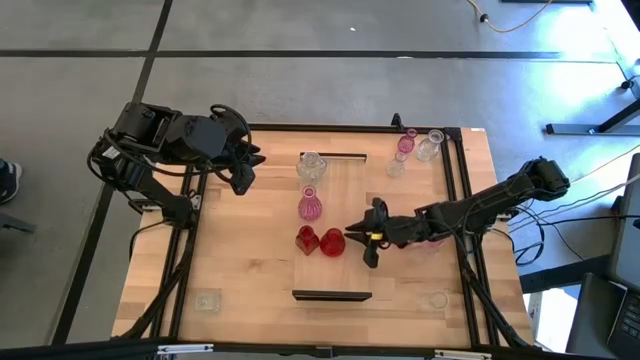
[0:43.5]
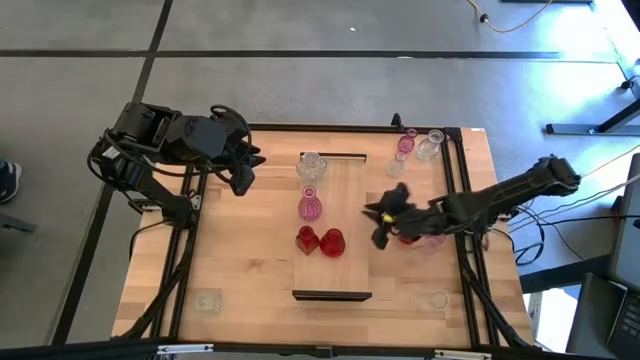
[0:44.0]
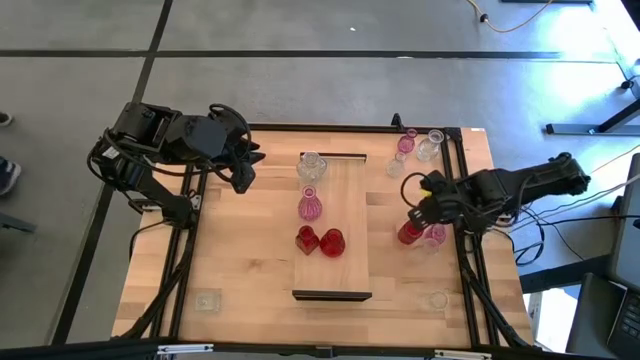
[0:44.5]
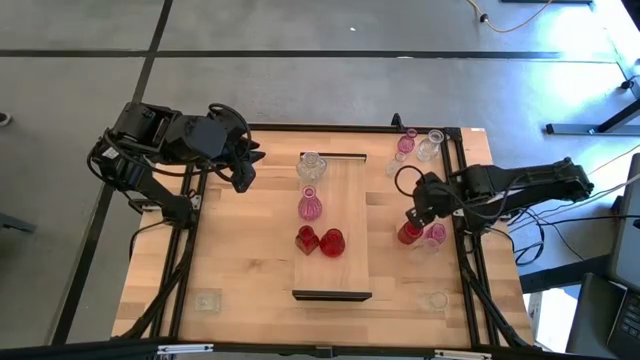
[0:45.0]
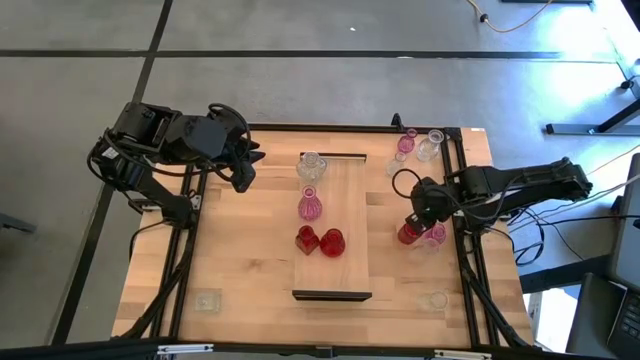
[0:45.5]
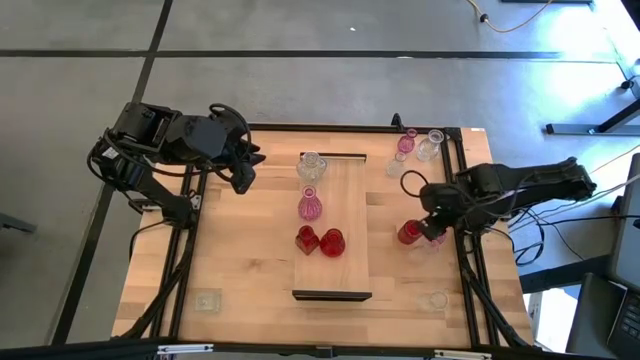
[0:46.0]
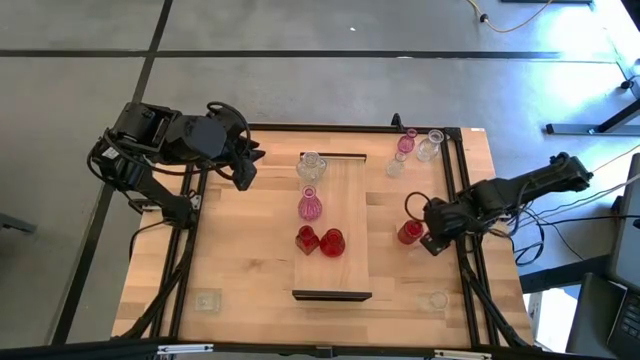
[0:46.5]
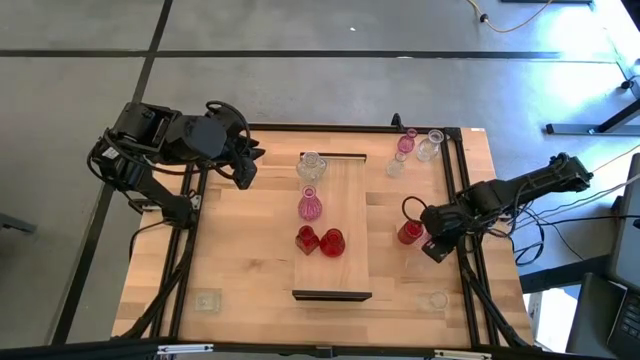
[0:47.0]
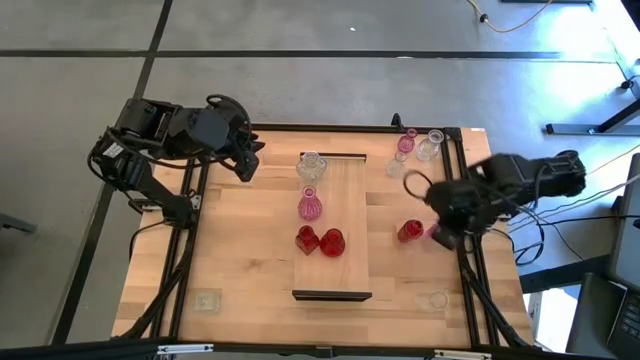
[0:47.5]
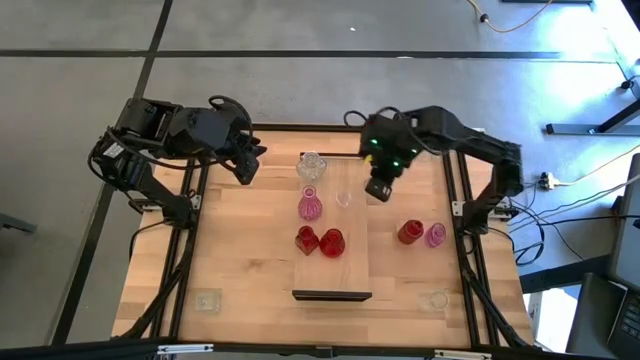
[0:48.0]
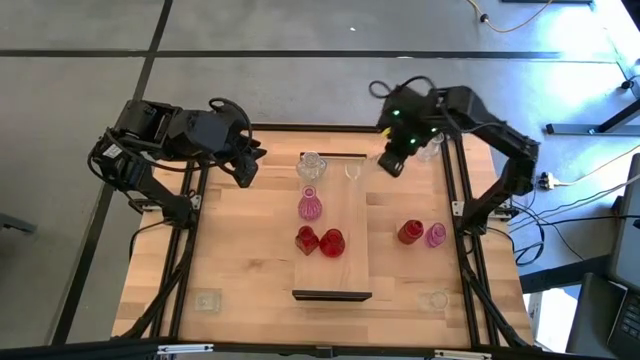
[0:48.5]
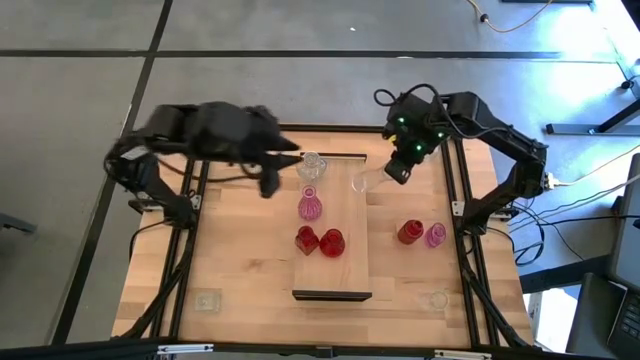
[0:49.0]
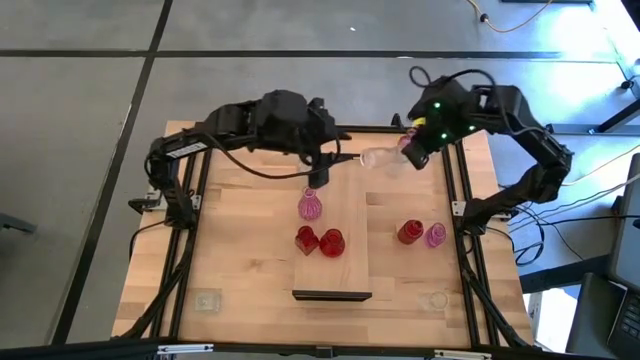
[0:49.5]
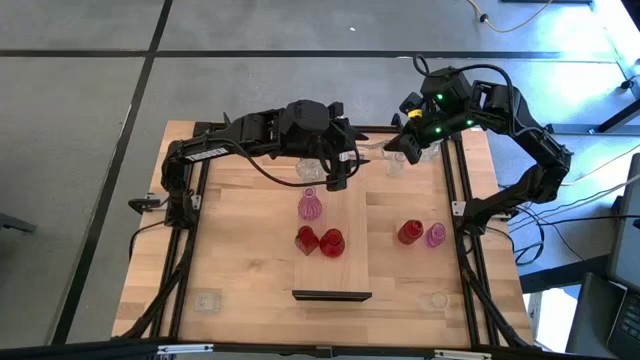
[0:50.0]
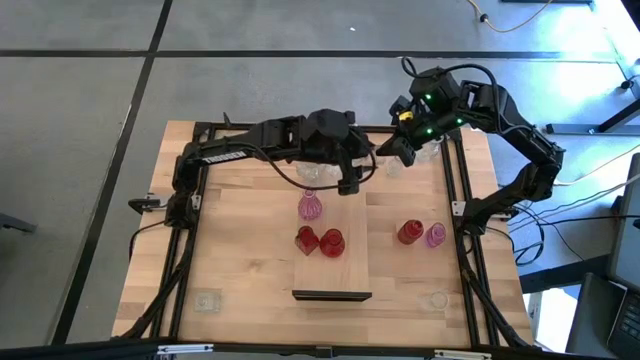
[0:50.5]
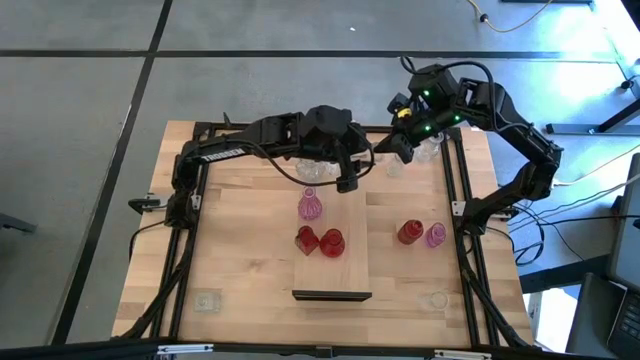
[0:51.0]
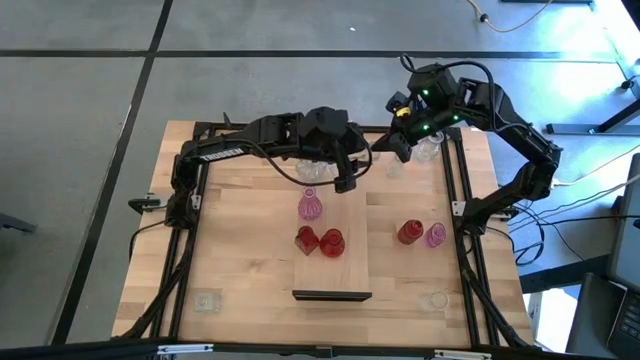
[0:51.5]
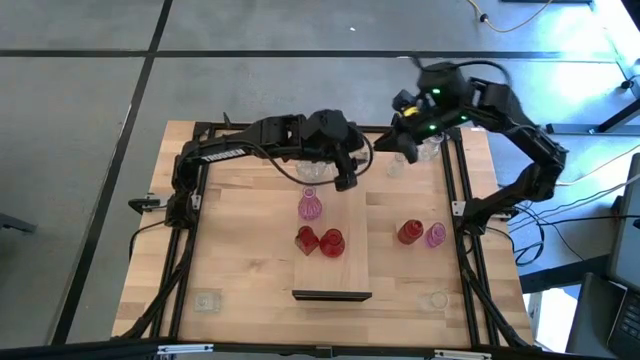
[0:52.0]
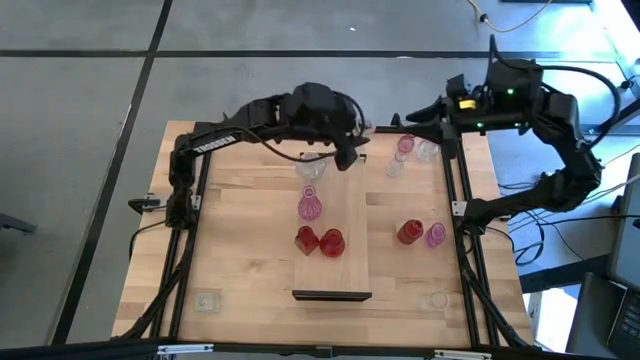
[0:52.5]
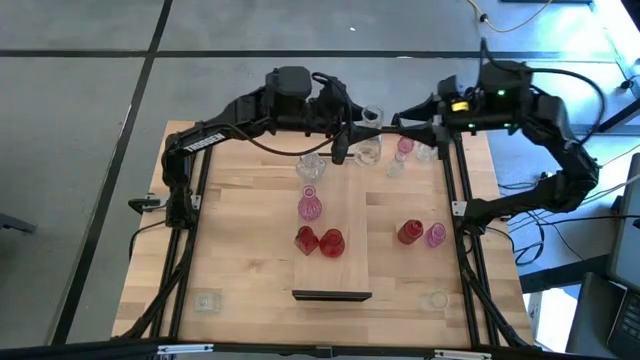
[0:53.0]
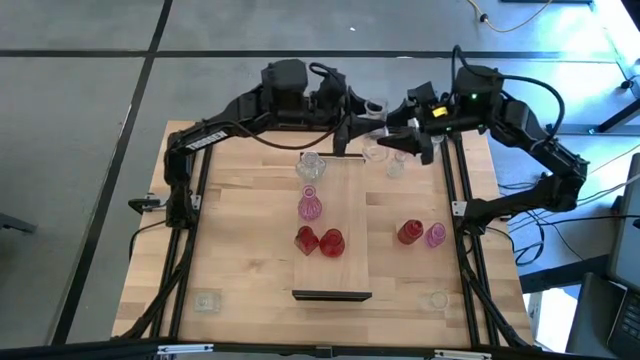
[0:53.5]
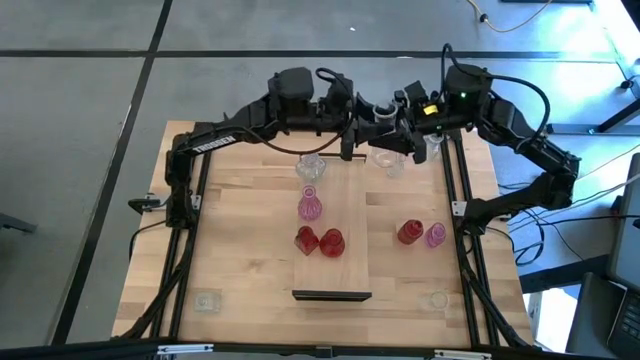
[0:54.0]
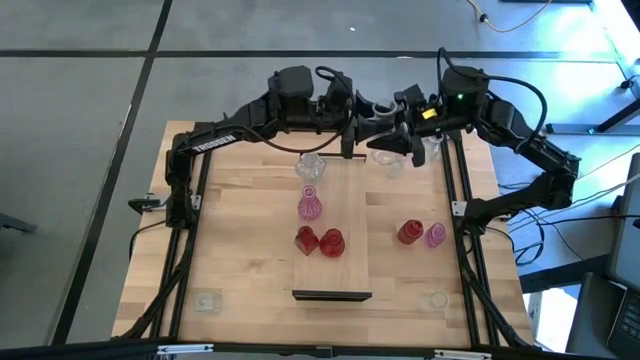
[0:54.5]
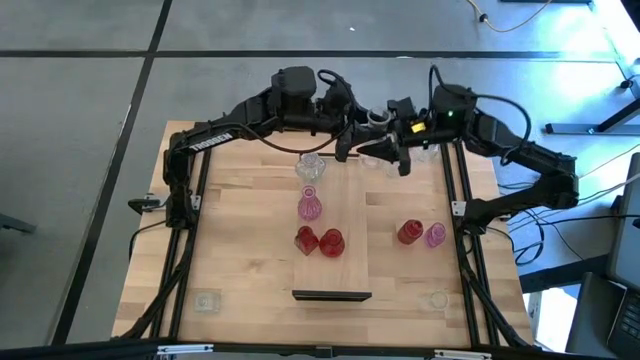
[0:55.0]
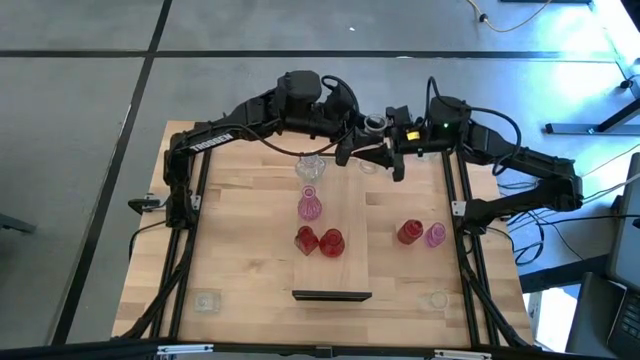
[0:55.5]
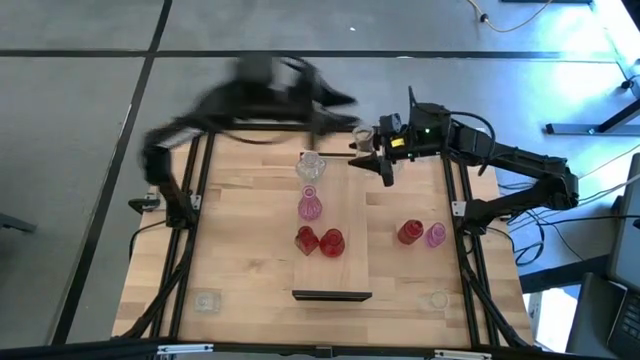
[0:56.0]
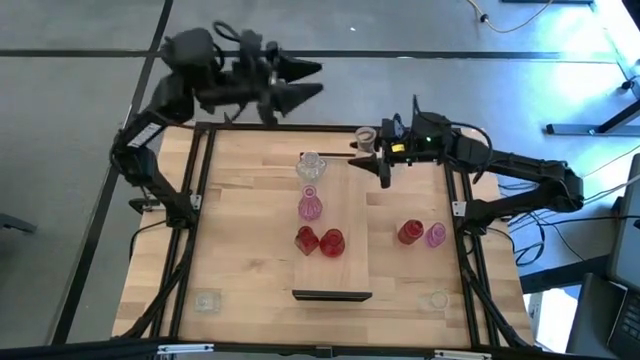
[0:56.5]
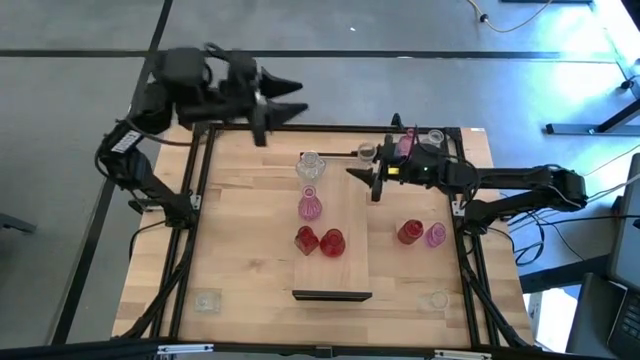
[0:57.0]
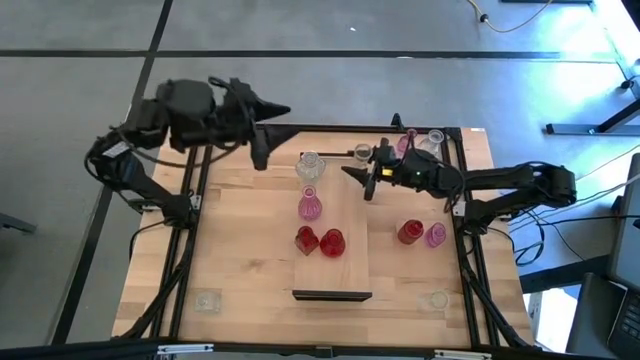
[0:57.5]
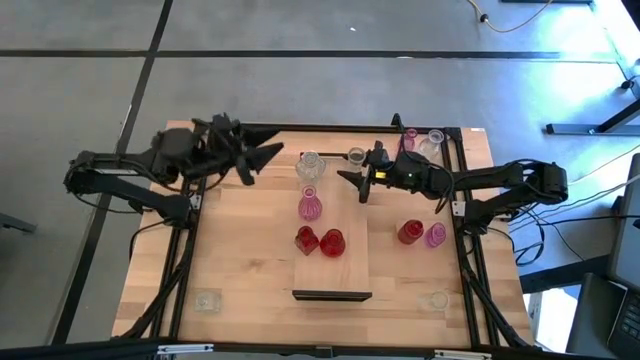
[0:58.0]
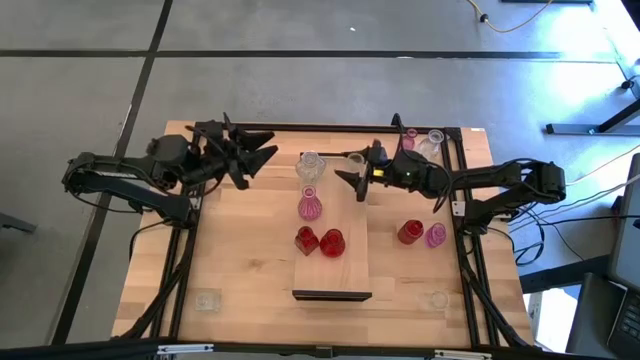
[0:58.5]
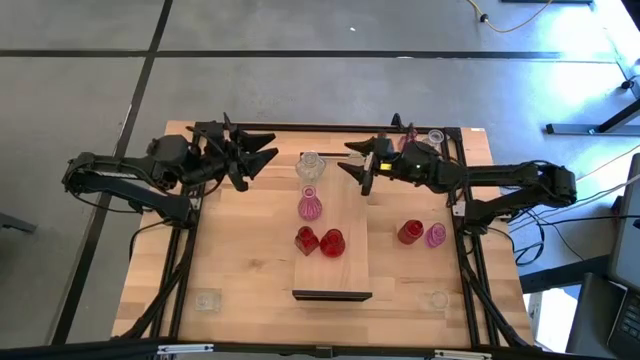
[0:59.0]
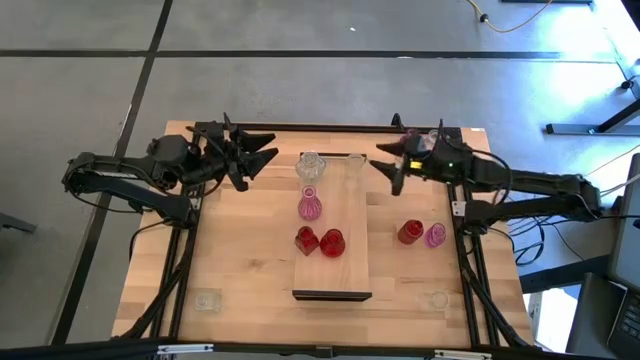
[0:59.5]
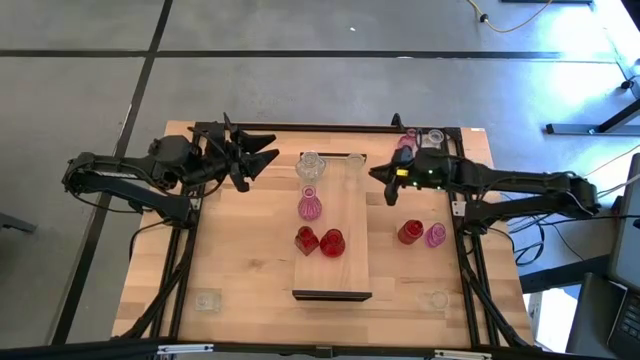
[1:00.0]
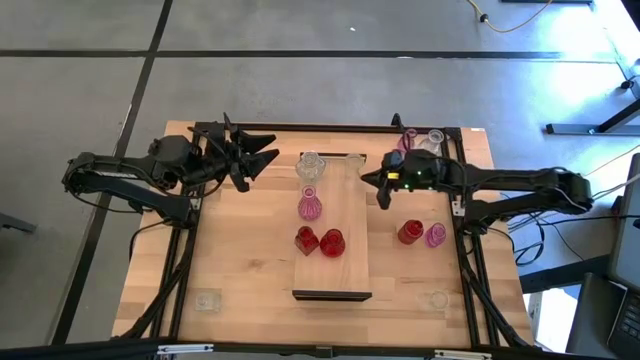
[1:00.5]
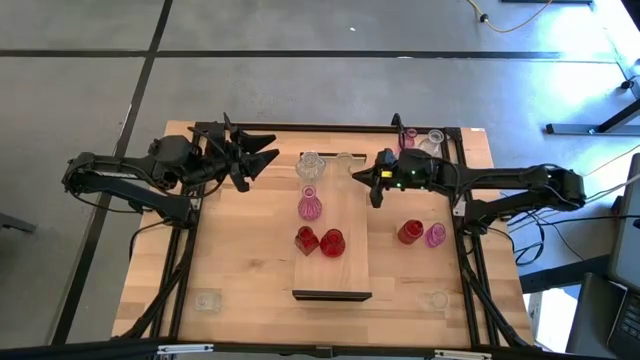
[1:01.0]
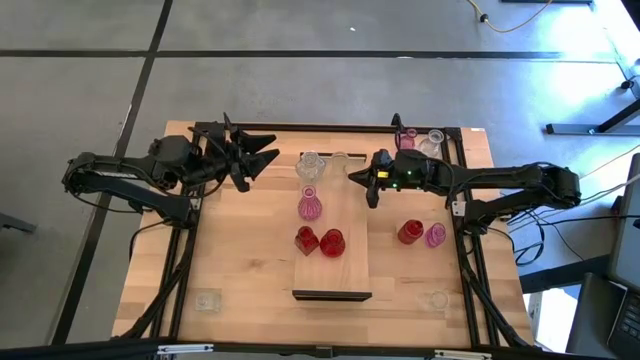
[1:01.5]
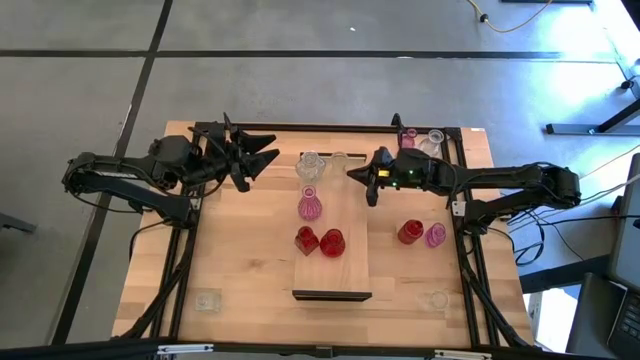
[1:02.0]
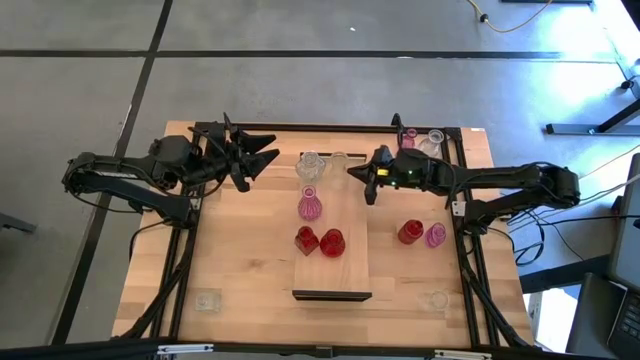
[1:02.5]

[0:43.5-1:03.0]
Task: sort vases onto shelf
Put the transparent vase on the shelf aligned with the other transparent vase
